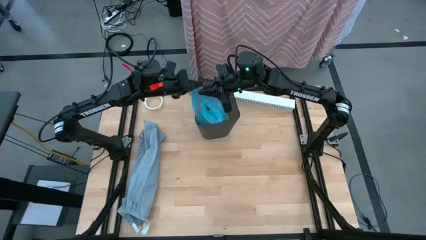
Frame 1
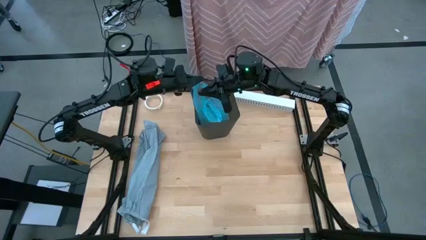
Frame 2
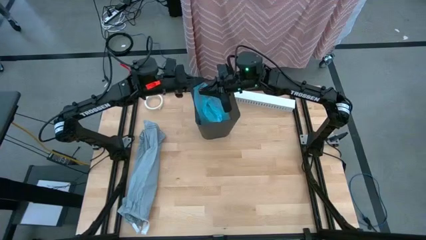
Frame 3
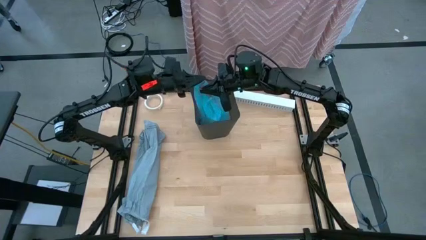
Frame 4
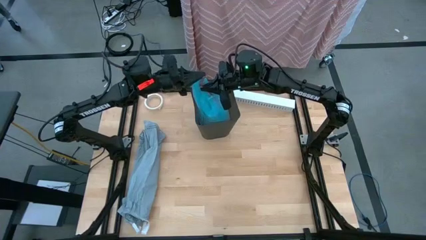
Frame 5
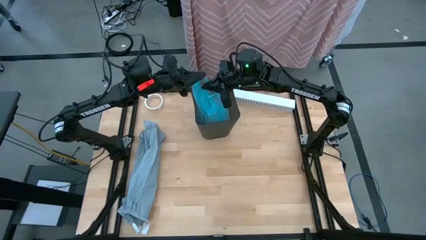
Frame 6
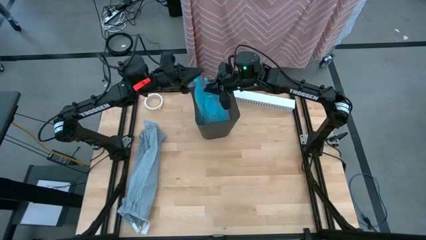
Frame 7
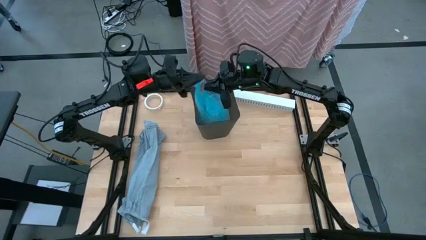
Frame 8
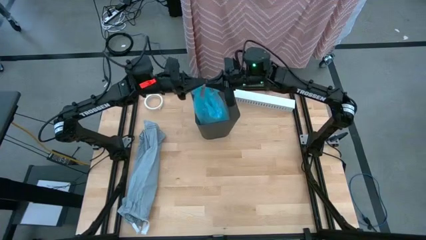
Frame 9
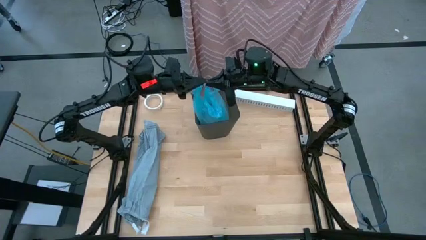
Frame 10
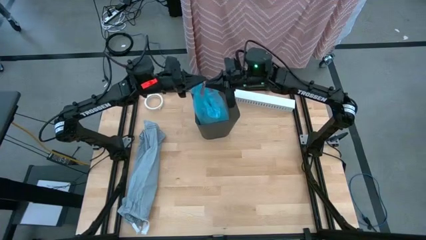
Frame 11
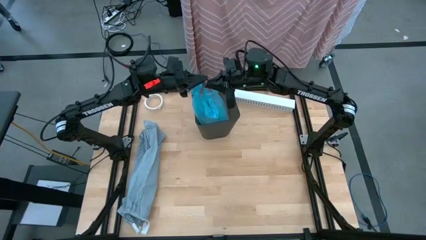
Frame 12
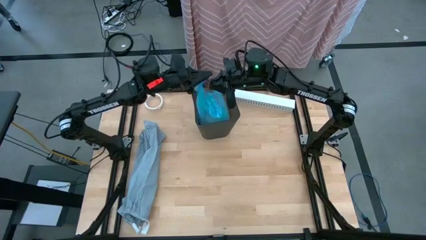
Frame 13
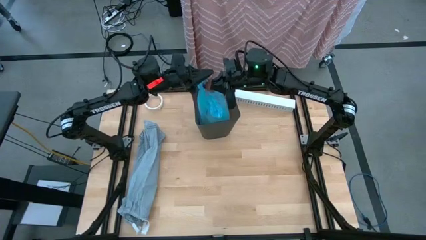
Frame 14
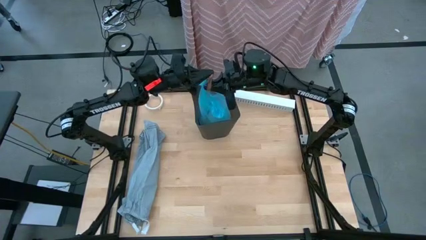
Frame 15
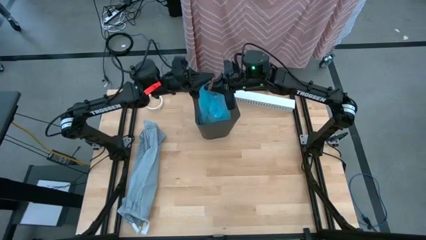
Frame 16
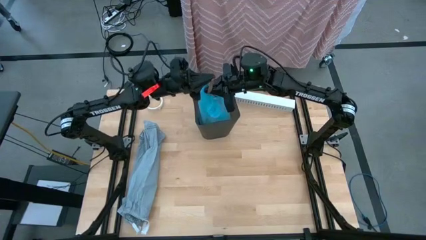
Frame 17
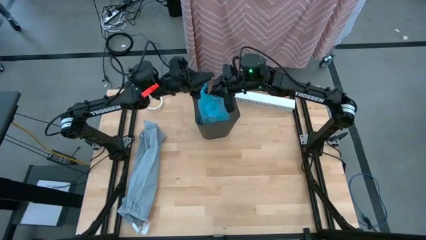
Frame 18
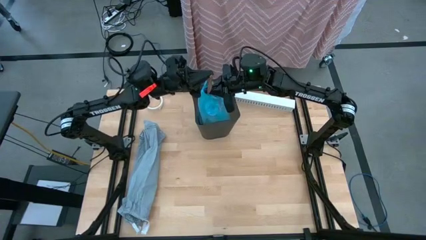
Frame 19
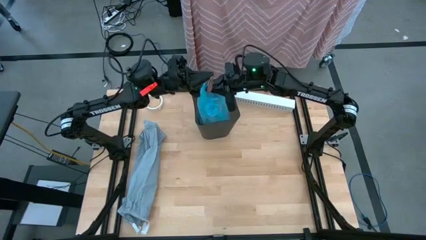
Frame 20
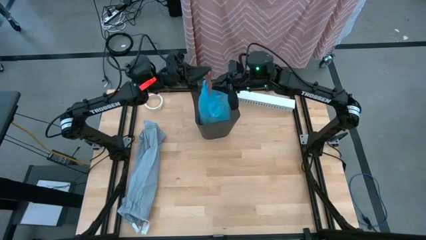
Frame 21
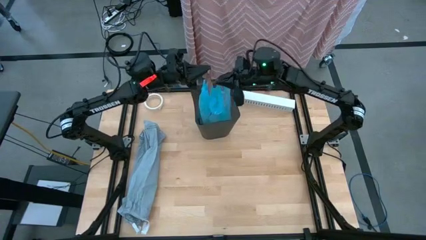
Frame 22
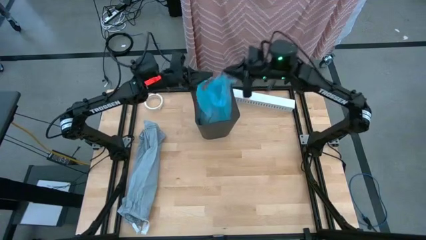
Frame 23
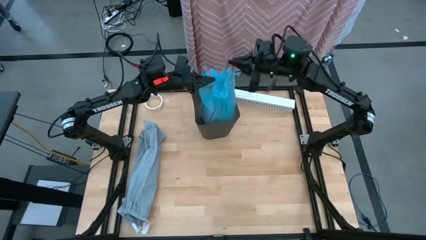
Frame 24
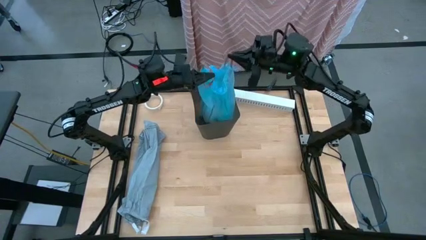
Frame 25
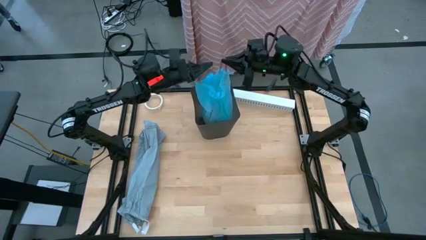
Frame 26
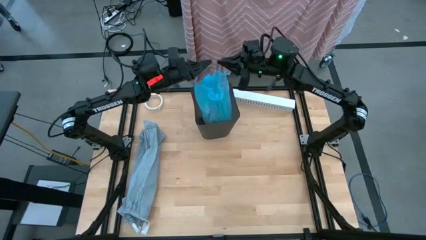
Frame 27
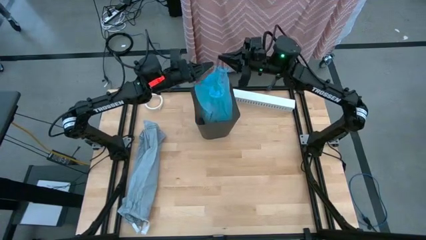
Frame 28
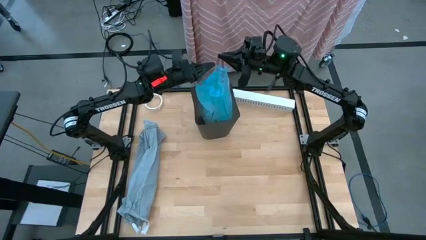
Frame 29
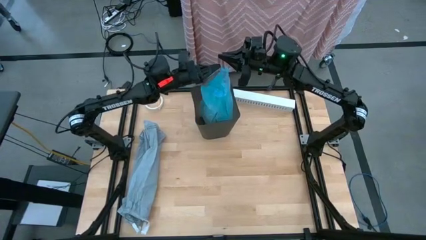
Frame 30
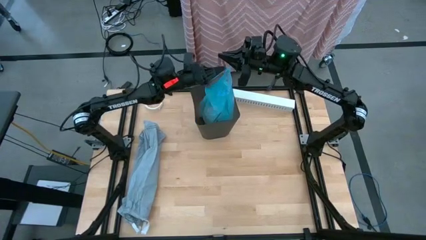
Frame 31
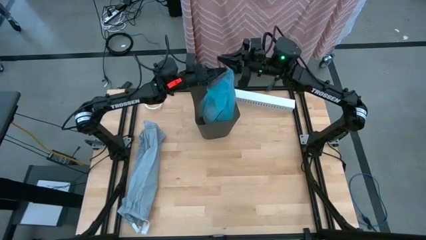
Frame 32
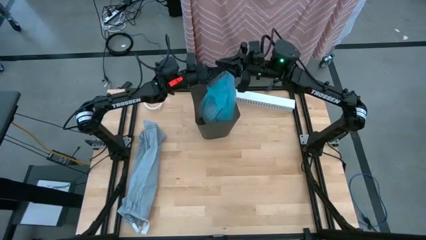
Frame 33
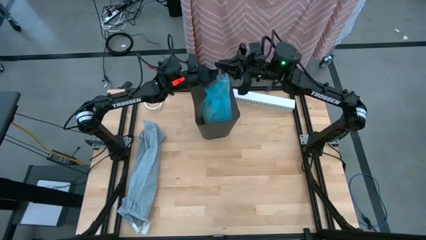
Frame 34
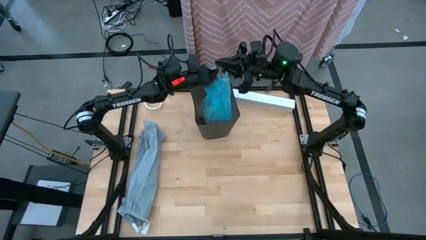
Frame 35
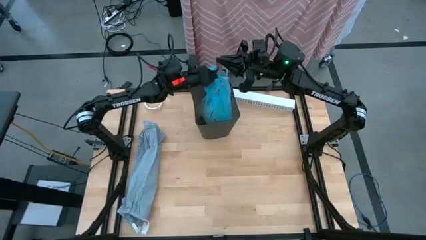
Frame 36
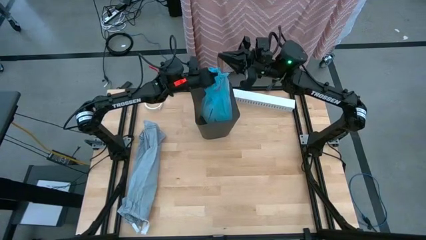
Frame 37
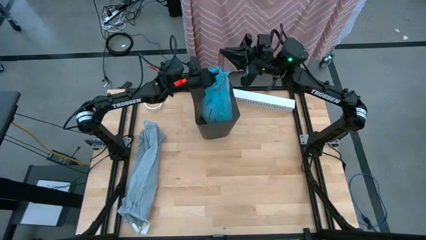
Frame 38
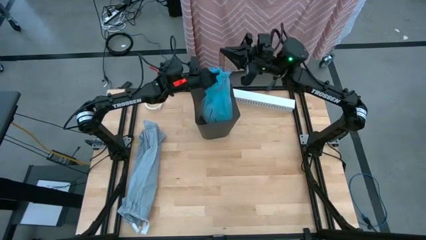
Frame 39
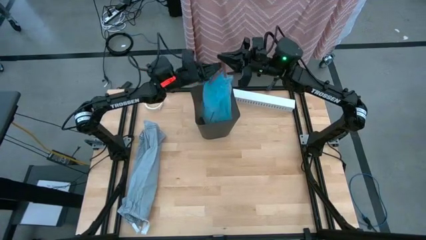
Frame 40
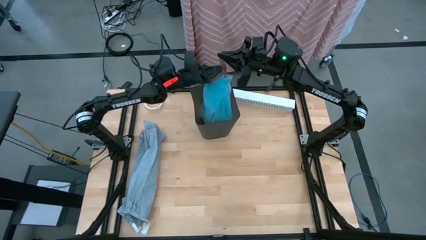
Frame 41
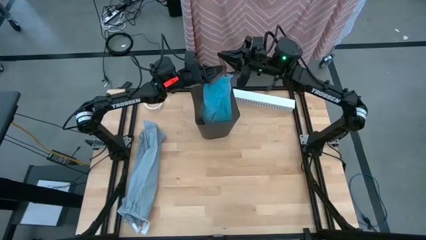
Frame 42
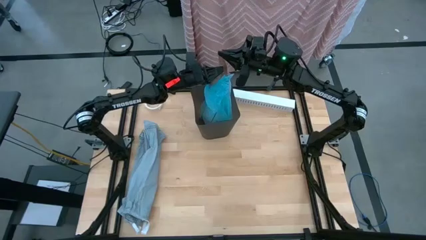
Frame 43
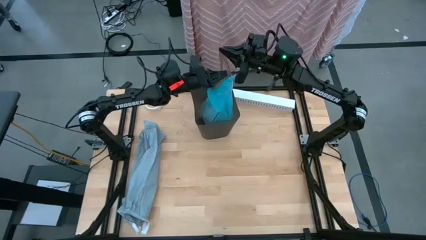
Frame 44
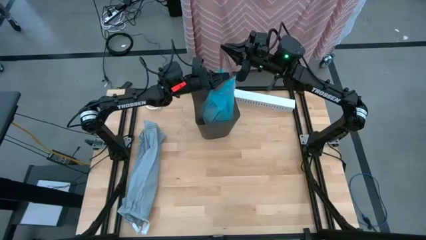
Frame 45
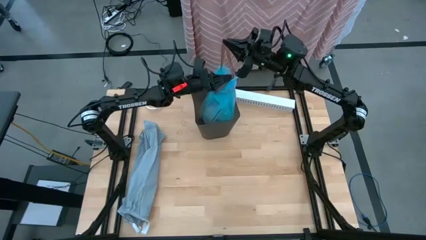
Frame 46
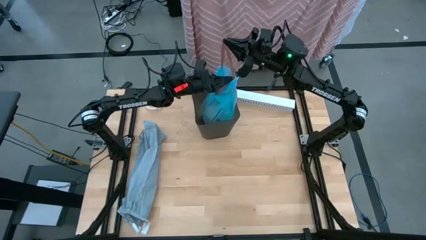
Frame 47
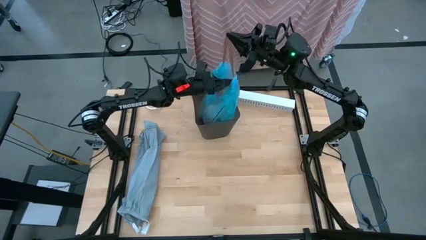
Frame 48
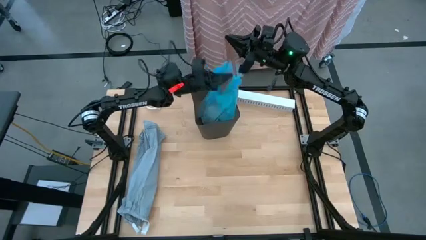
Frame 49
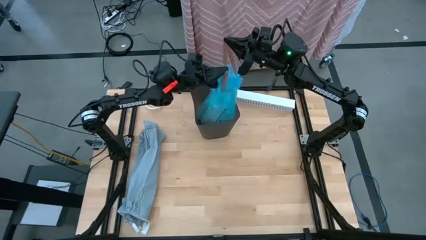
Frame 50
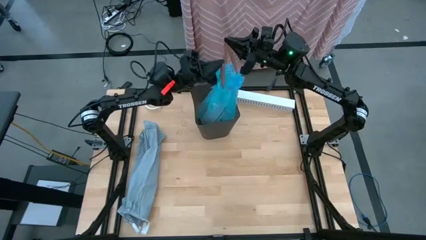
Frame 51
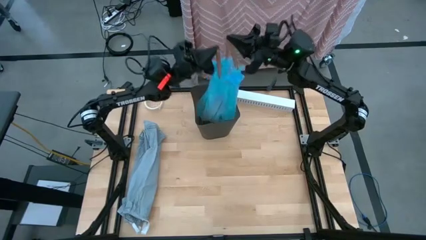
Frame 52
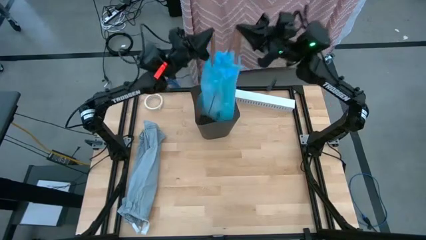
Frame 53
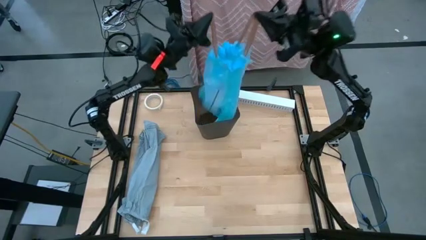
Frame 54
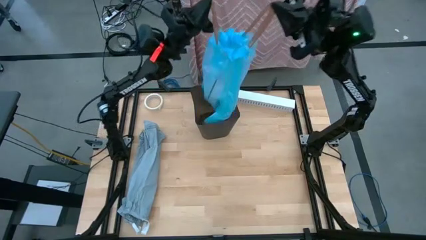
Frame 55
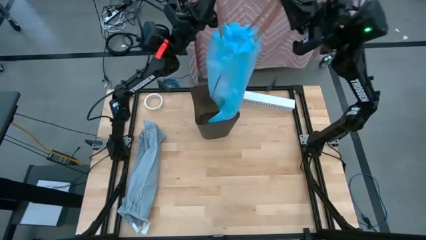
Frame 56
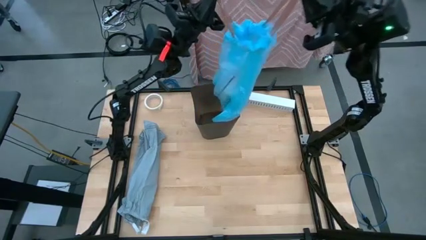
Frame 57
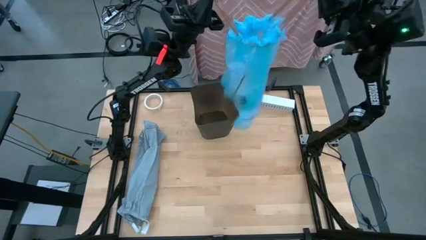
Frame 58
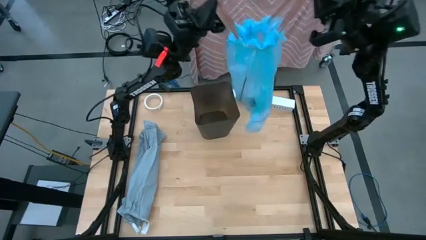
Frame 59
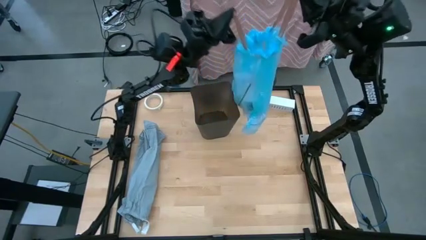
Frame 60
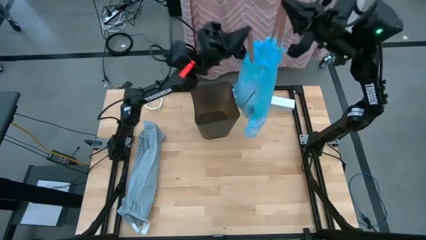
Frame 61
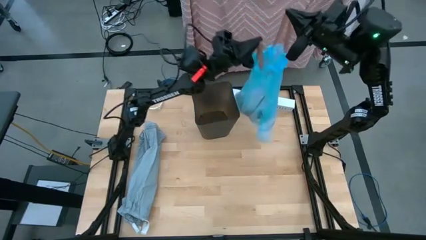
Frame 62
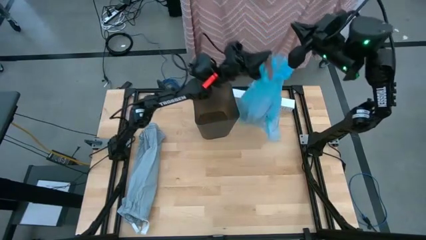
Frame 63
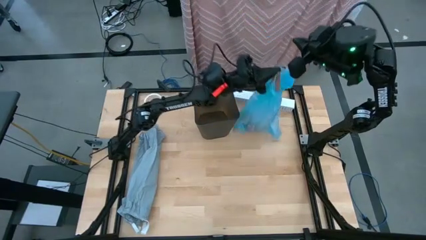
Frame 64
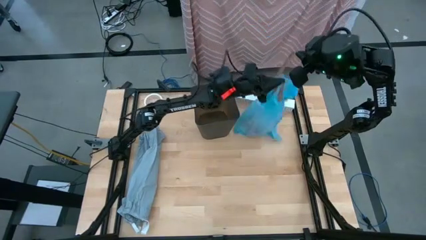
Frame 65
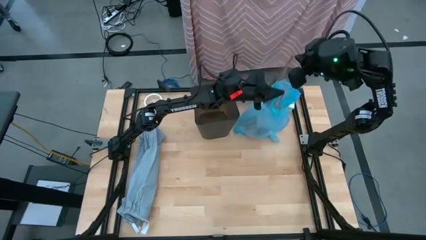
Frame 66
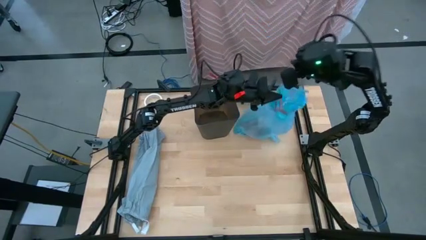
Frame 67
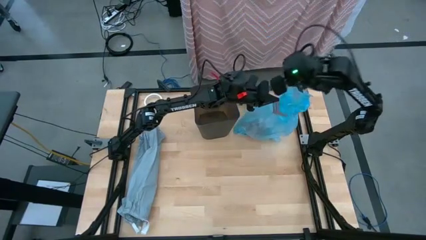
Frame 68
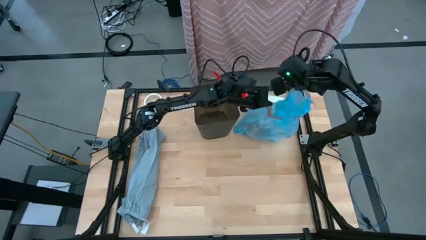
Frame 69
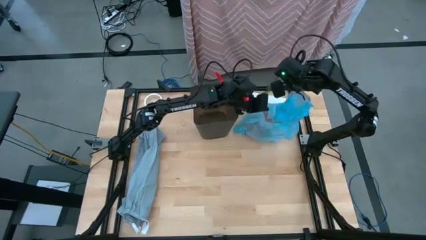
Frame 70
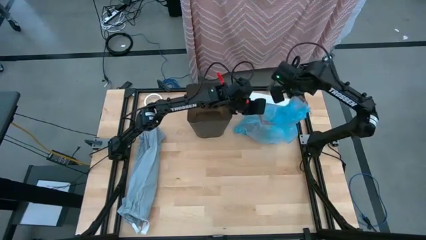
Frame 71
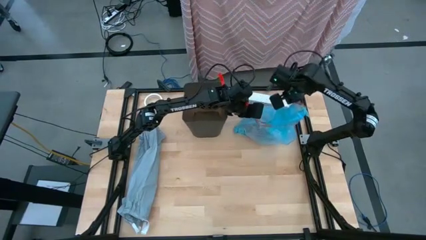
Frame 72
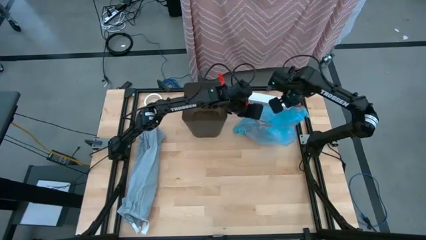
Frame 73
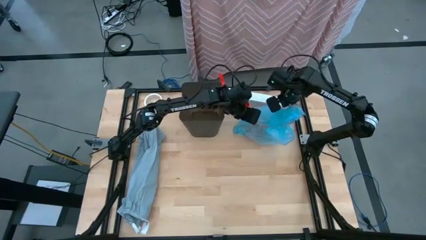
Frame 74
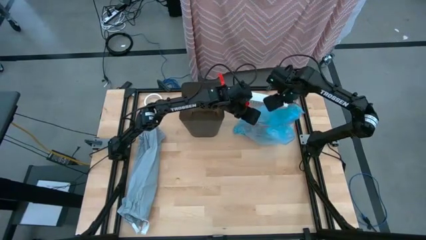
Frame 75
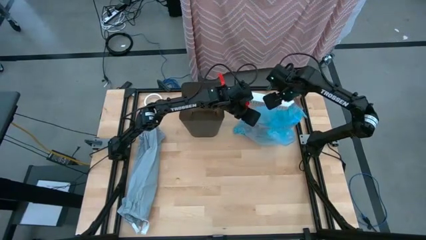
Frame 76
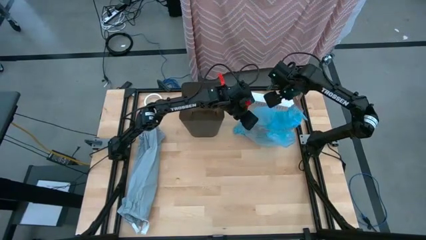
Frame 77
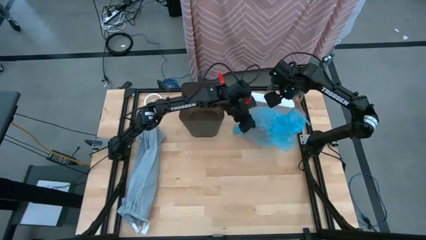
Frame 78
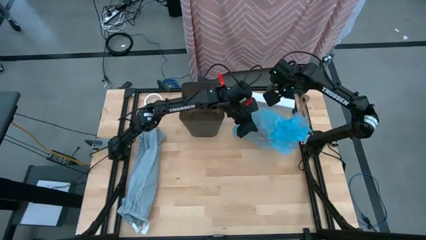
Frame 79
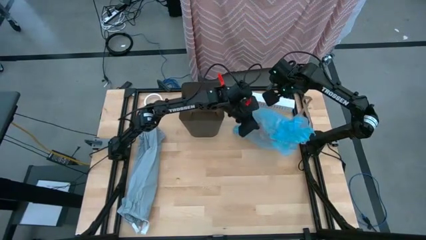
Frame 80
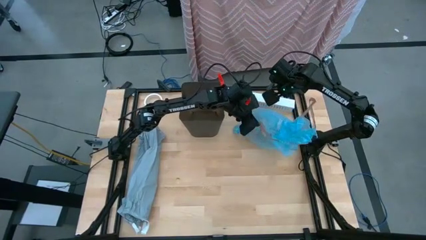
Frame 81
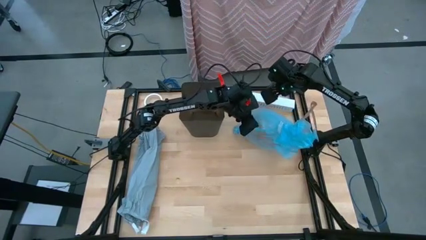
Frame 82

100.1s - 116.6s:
Task: place trash/remove bag and relplace
Remove the blue trash bag from the trash bin
